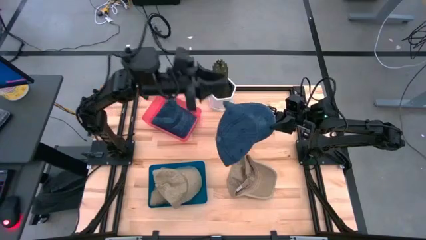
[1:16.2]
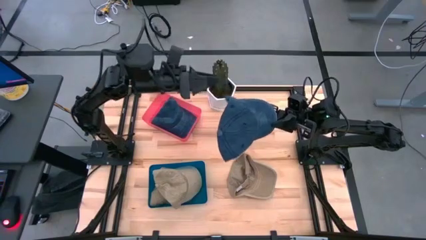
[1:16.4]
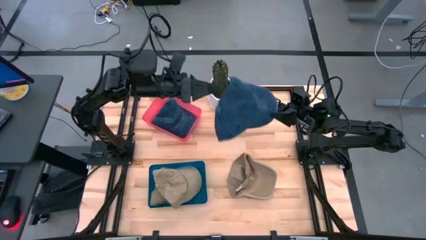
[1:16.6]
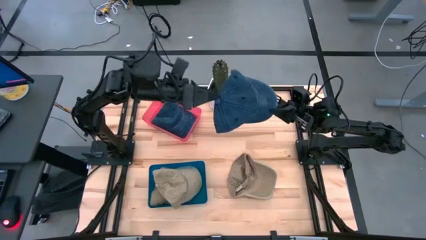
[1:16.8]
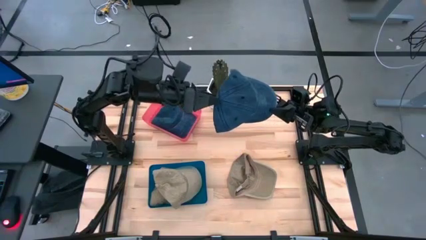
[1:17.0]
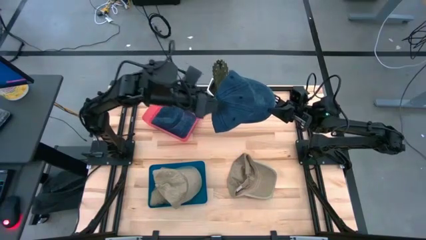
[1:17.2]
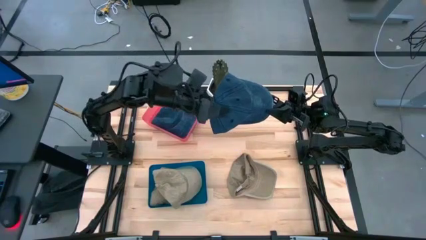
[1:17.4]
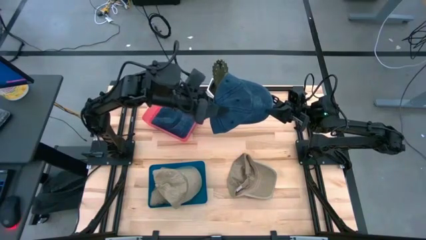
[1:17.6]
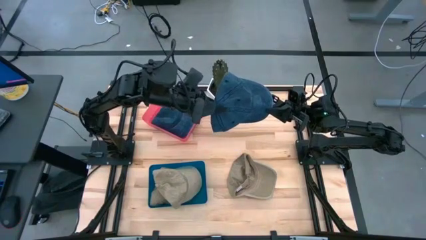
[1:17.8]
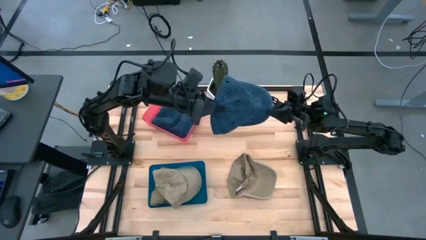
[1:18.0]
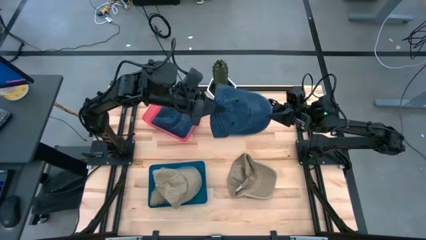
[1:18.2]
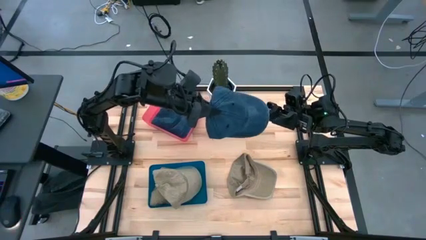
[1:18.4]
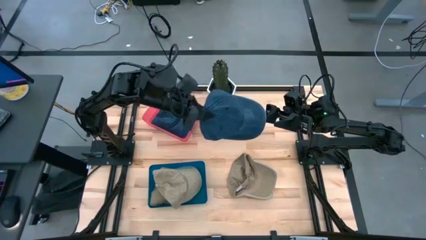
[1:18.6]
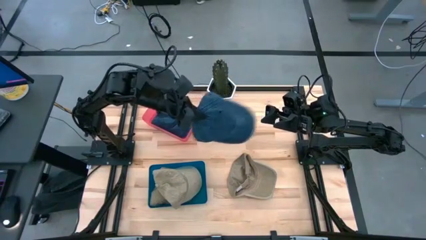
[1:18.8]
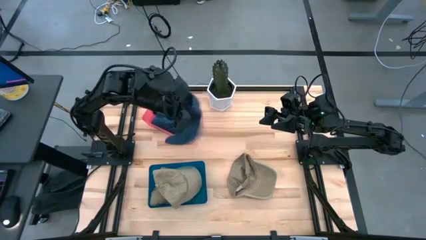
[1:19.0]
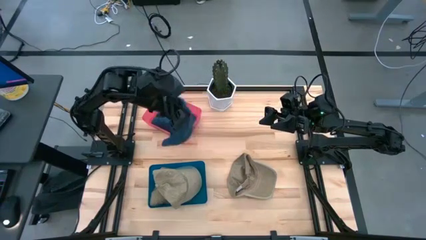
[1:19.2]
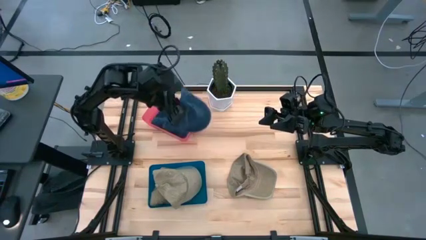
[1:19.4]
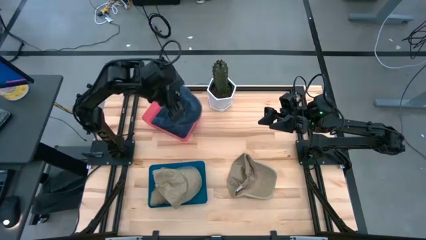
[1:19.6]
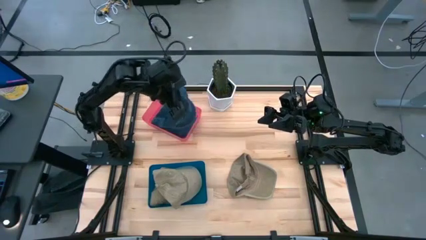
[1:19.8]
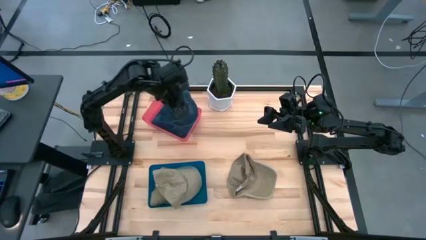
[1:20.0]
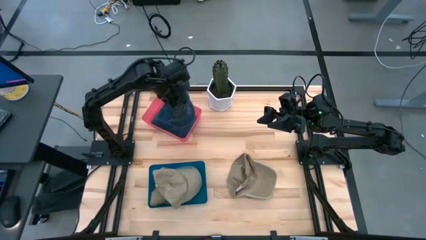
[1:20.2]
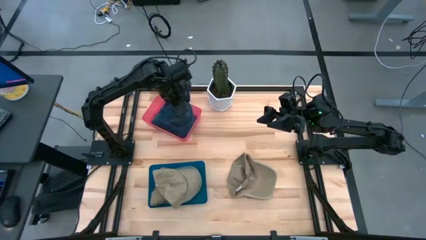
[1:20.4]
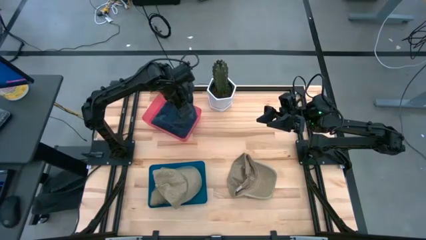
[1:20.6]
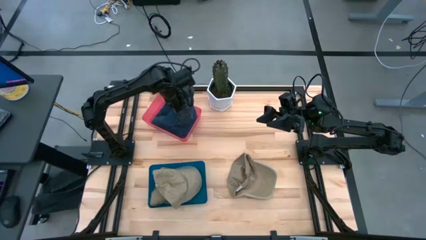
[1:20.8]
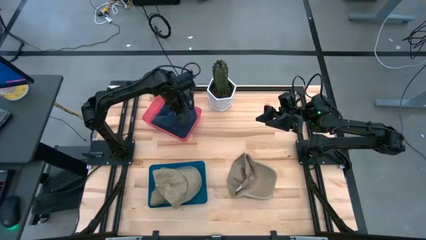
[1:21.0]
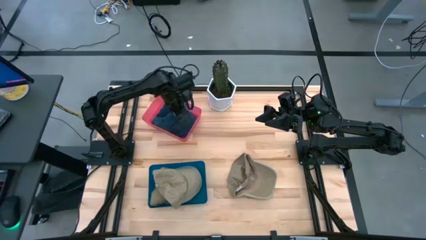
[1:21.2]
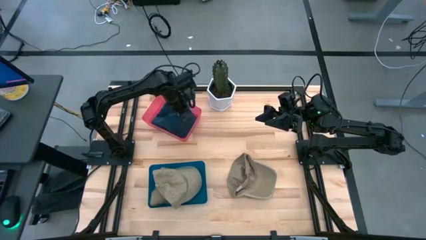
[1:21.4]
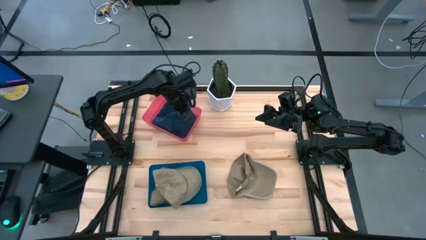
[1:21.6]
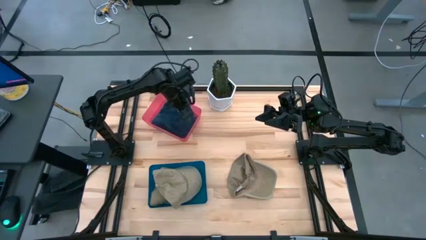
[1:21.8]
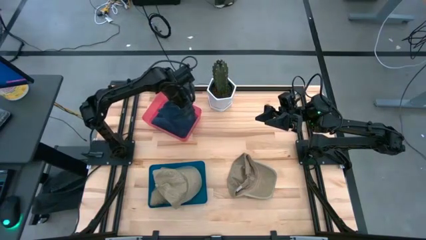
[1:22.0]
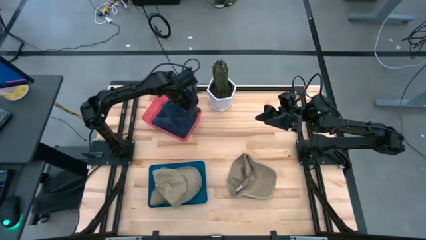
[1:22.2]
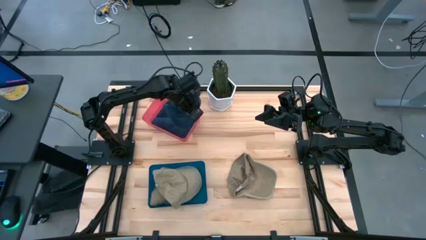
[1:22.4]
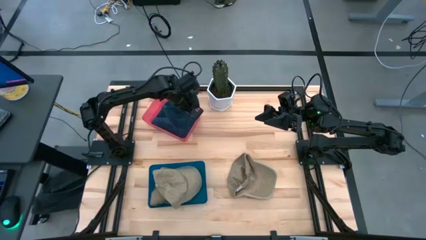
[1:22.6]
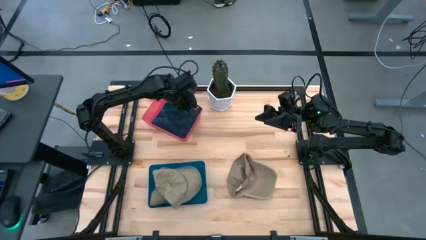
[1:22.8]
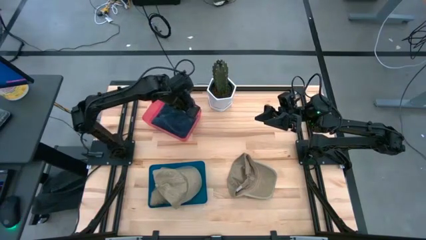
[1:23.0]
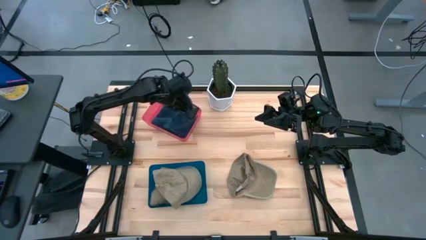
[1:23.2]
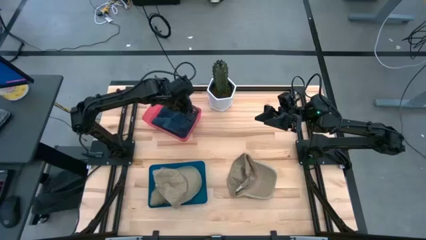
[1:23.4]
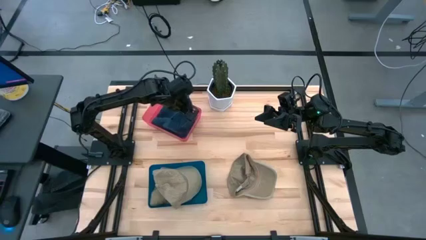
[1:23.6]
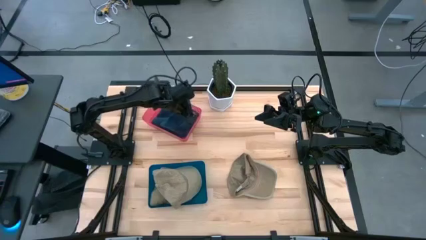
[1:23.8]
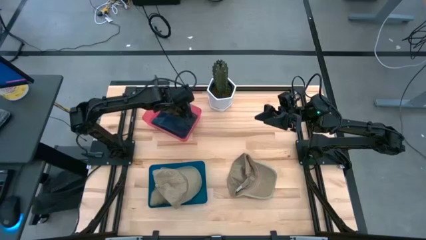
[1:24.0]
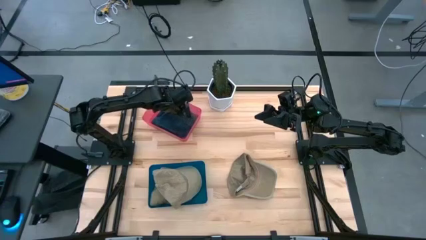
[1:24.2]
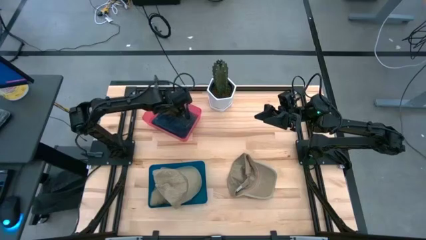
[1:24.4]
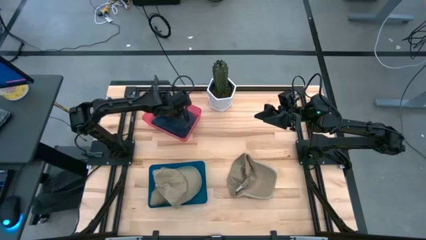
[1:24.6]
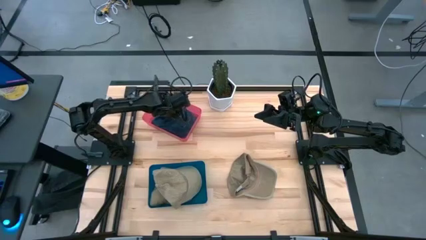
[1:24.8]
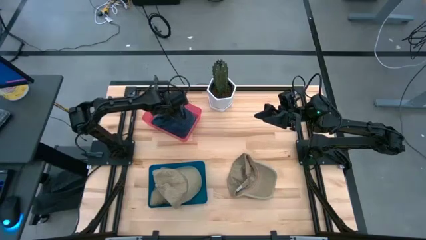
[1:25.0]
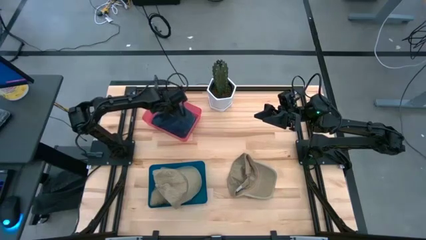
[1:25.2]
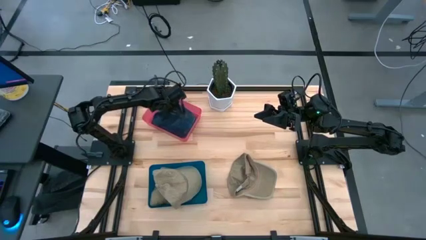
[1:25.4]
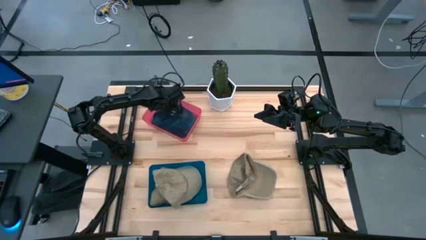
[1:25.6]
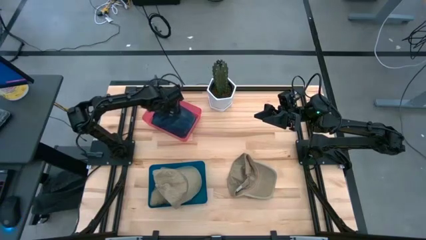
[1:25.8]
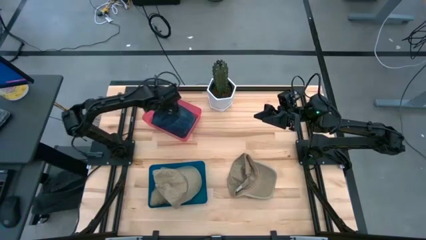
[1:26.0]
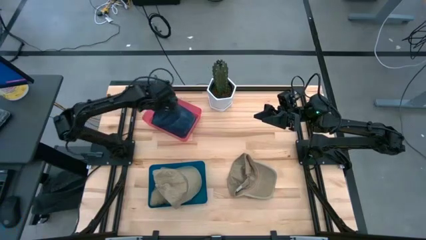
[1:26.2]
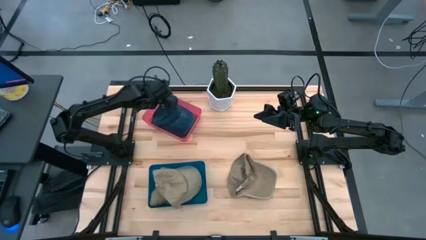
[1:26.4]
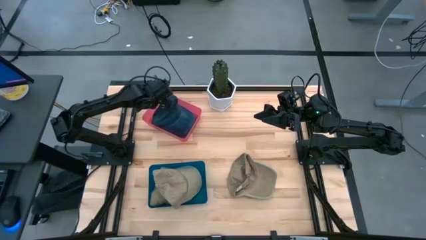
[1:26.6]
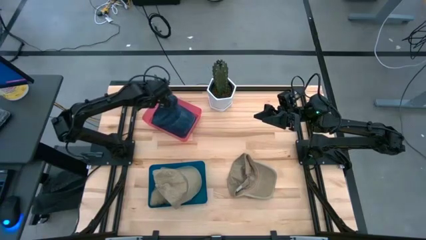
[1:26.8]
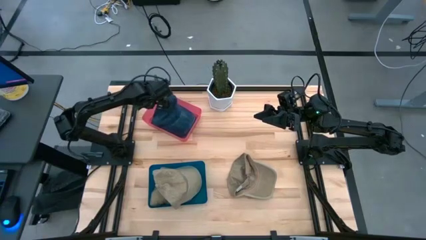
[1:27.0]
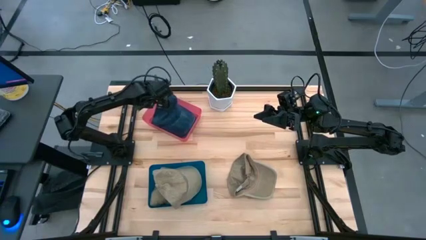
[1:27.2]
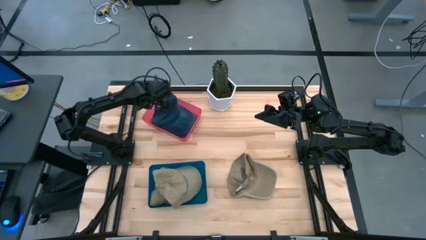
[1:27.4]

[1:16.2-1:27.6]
Task: Pick & Place hat
Put the blue cap into the pink bin
